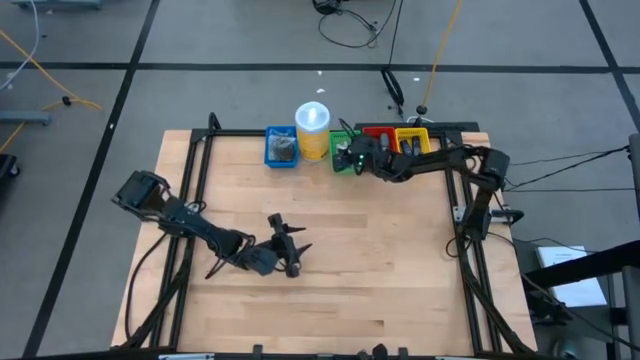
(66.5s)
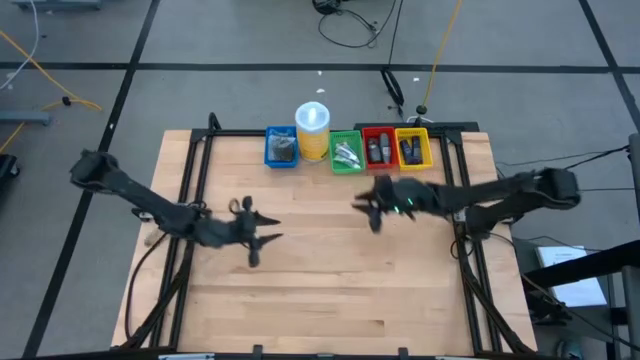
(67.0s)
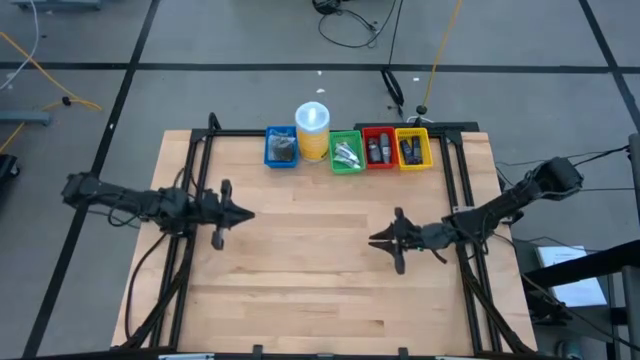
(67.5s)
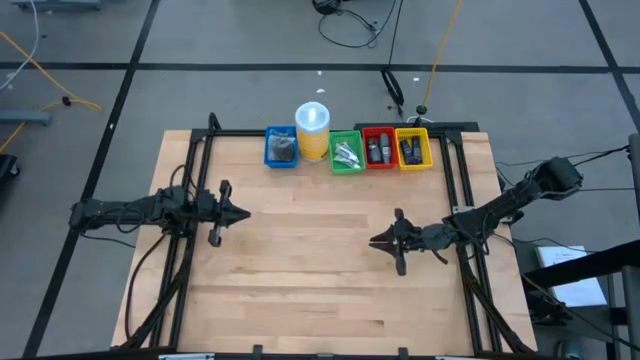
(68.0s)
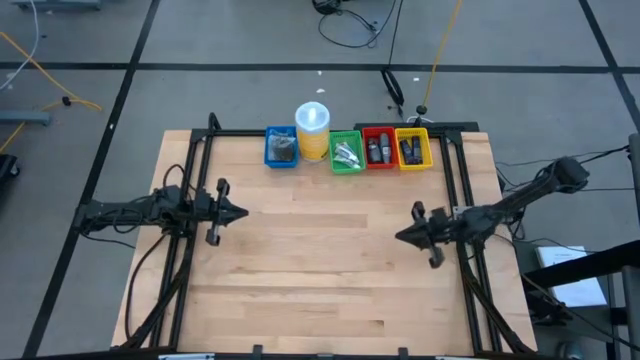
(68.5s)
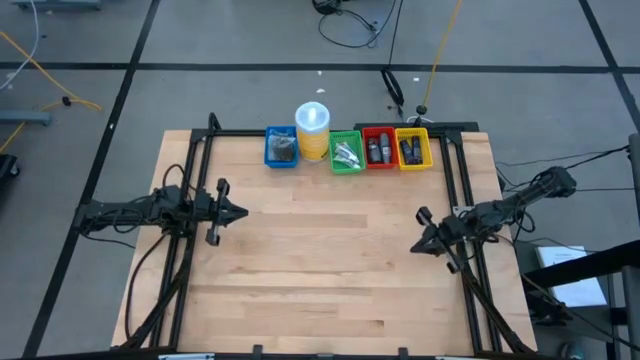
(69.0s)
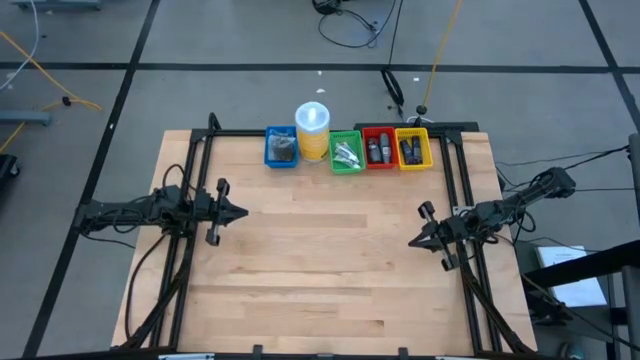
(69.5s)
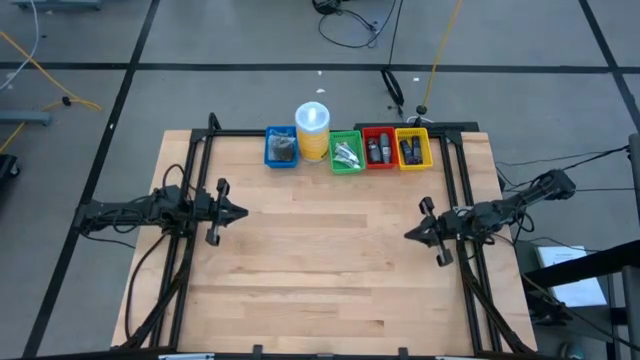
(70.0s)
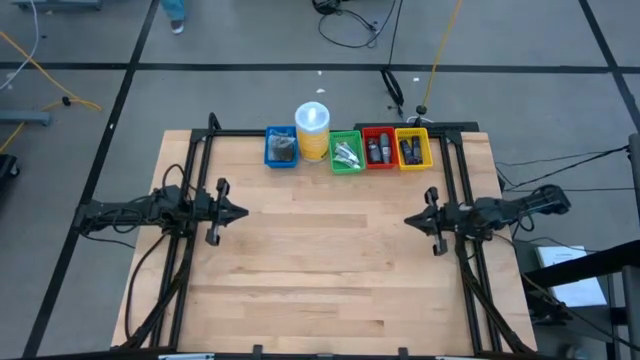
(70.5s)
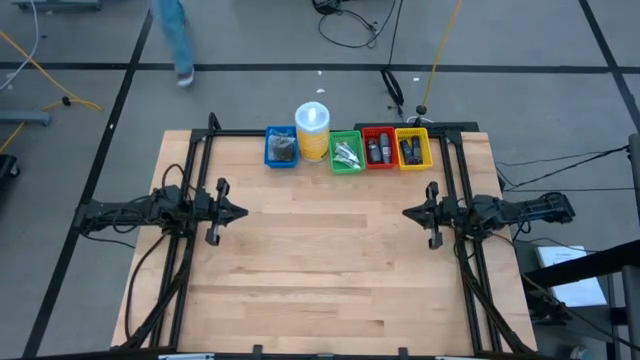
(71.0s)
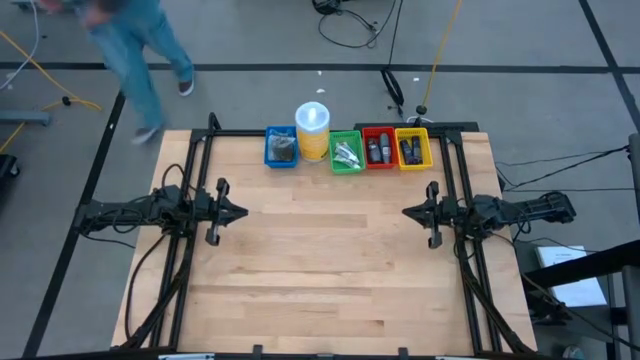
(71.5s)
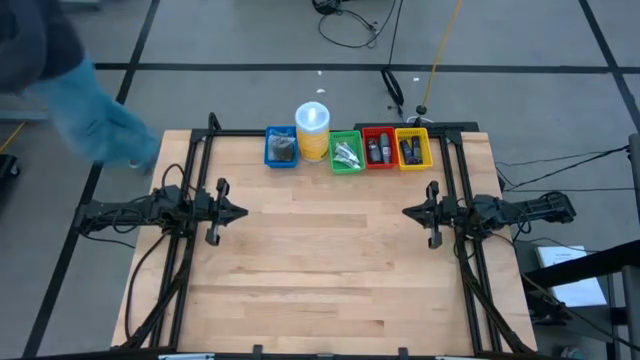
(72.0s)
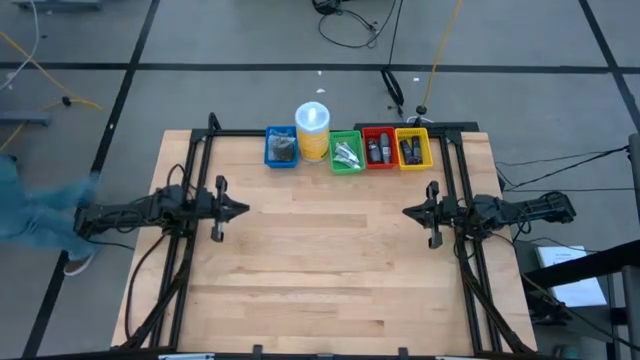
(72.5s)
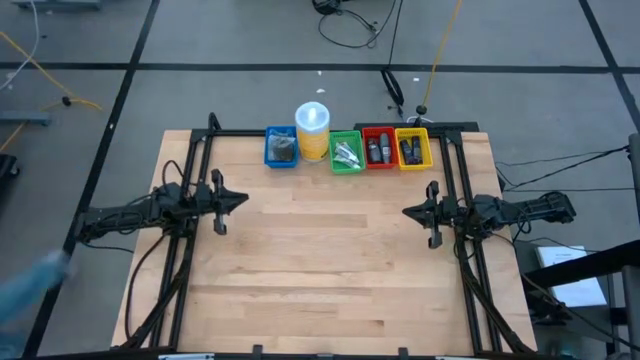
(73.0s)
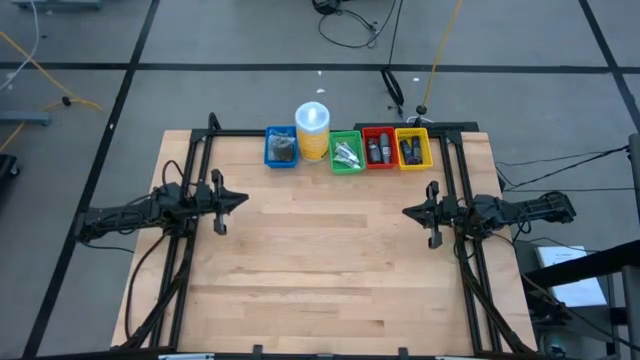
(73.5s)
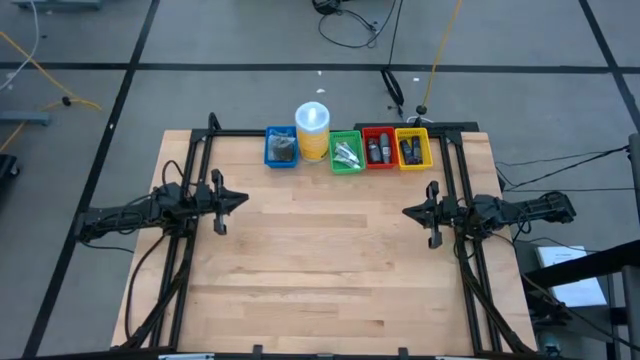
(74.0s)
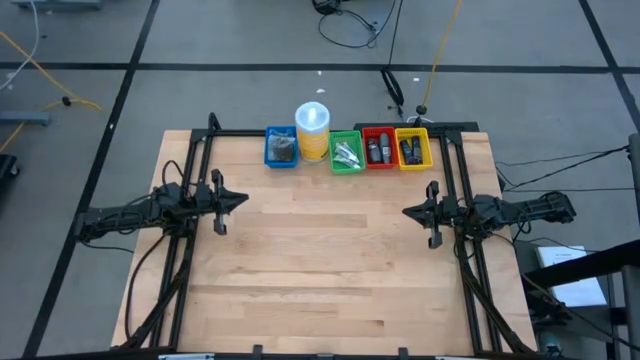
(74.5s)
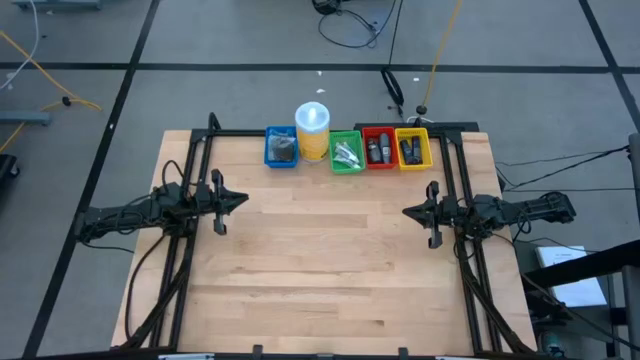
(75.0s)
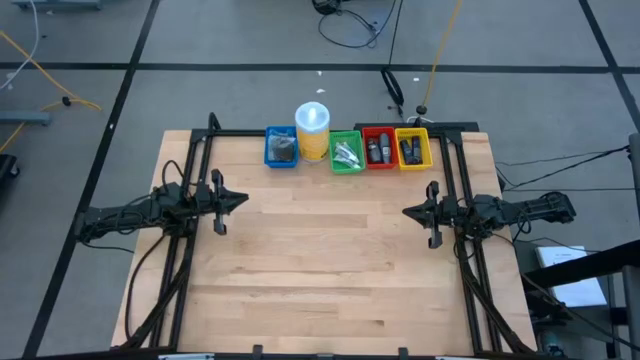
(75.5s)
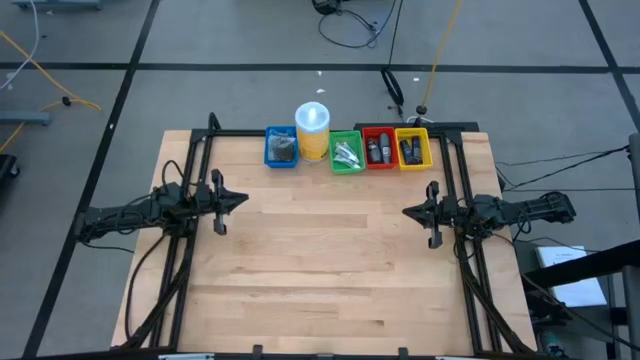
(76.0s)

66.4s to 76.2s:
Task: Pick & Place Travel size toiletries
Return to Home Position

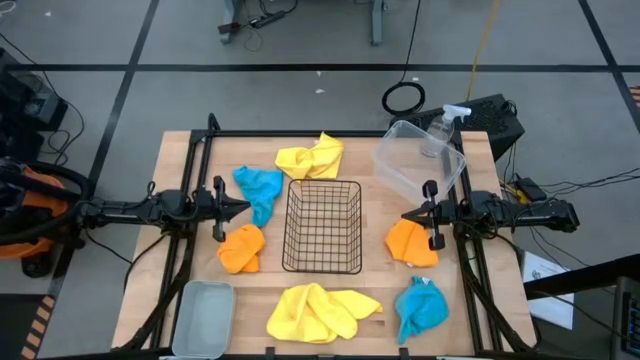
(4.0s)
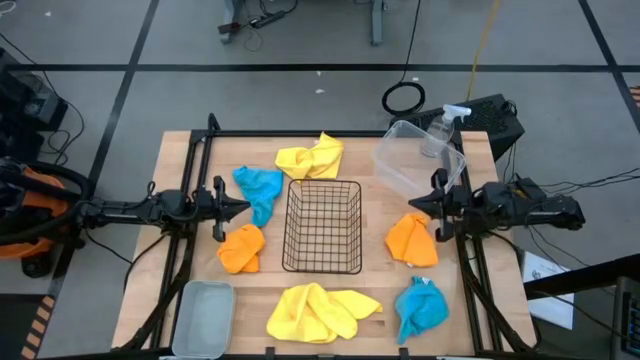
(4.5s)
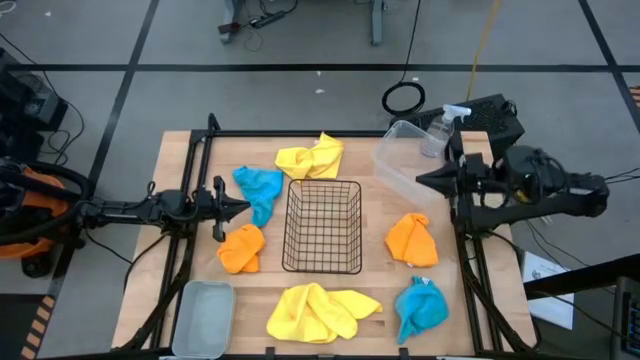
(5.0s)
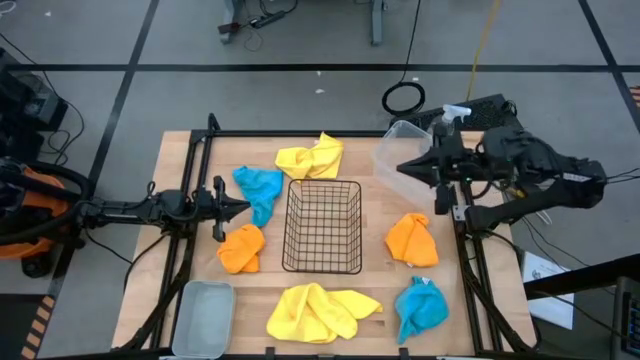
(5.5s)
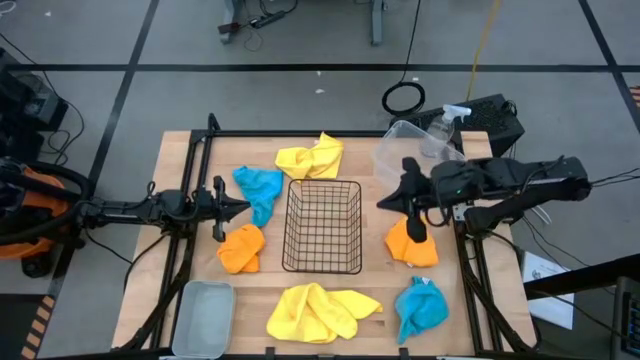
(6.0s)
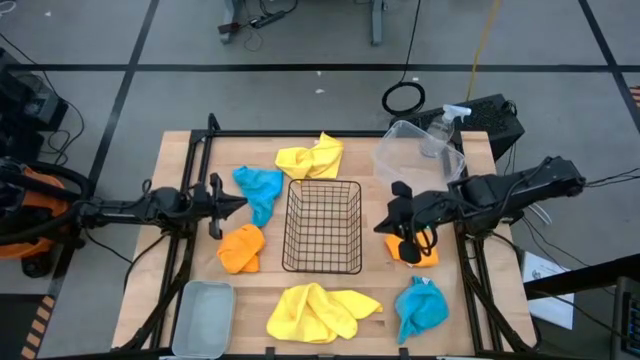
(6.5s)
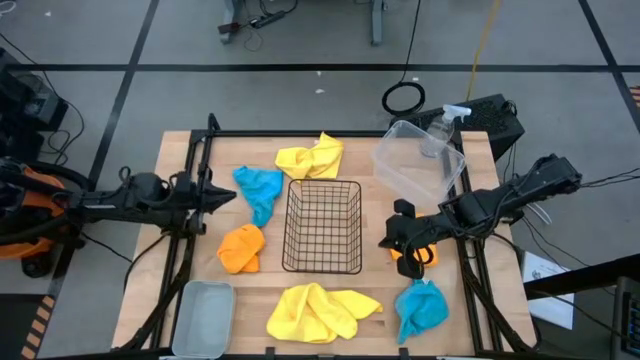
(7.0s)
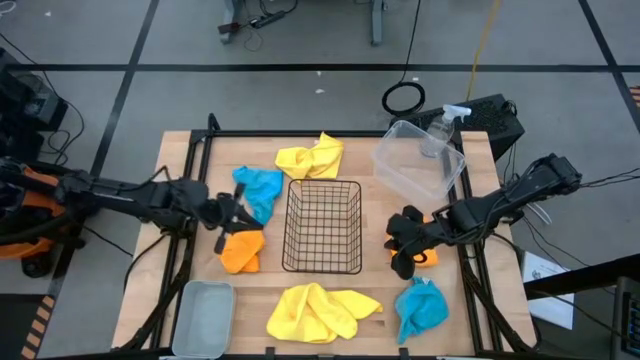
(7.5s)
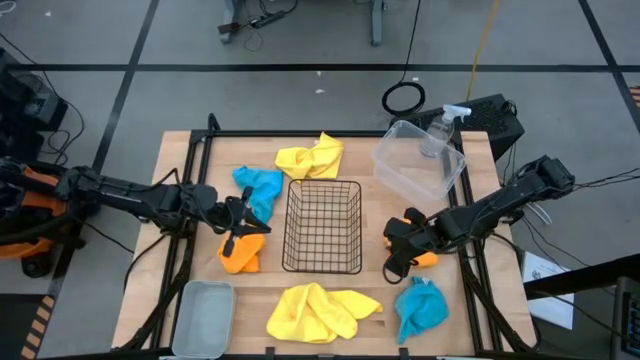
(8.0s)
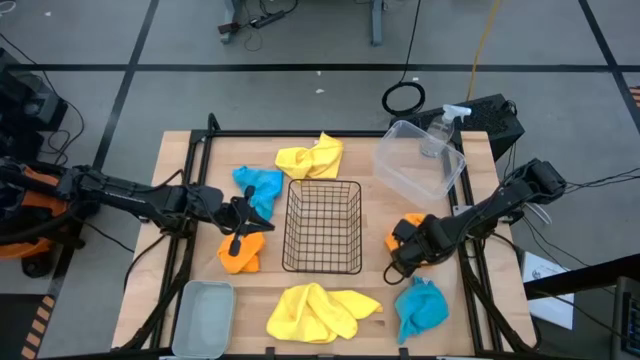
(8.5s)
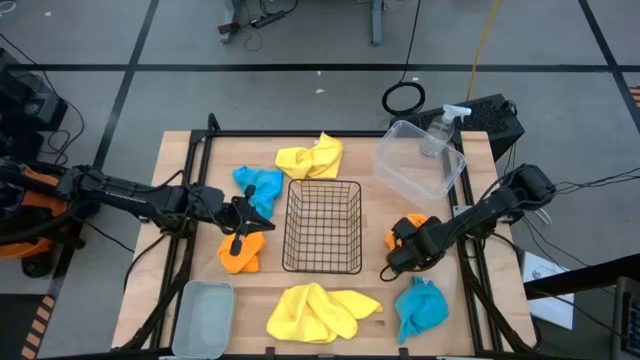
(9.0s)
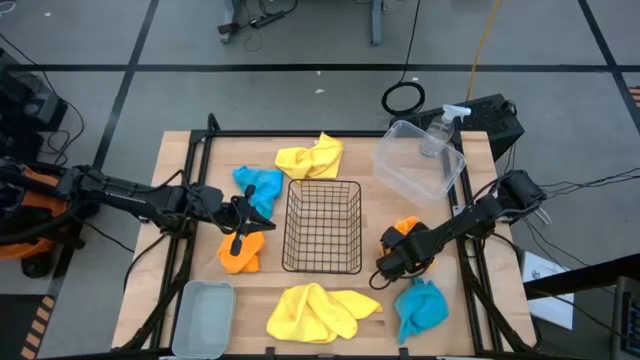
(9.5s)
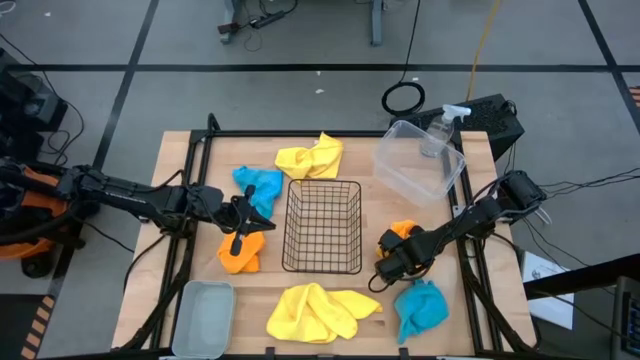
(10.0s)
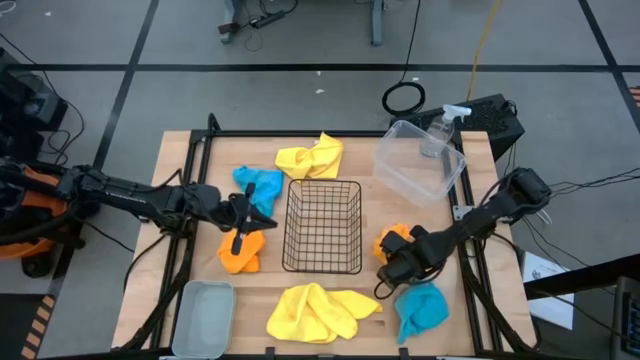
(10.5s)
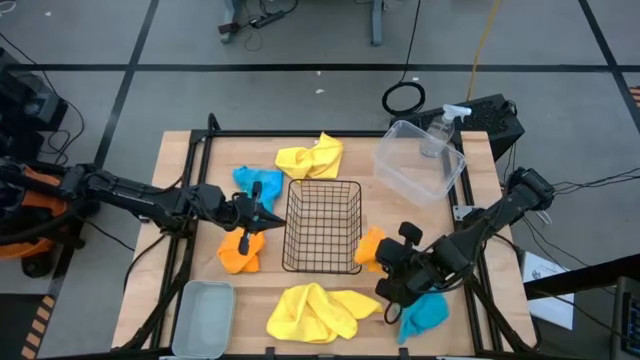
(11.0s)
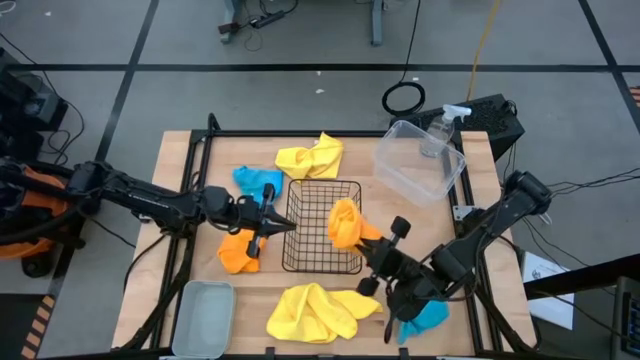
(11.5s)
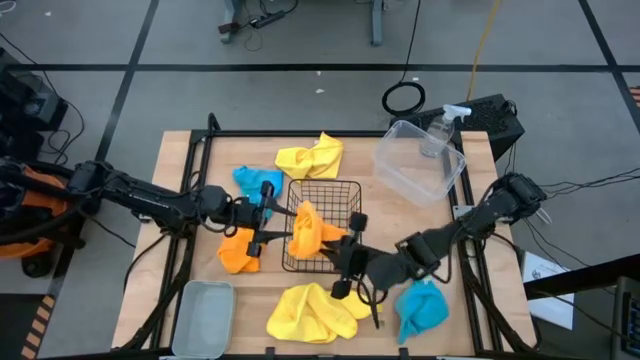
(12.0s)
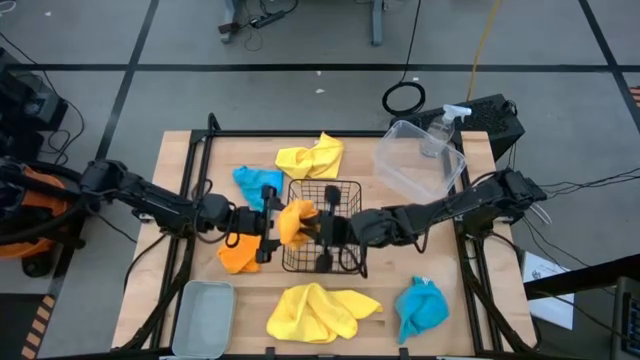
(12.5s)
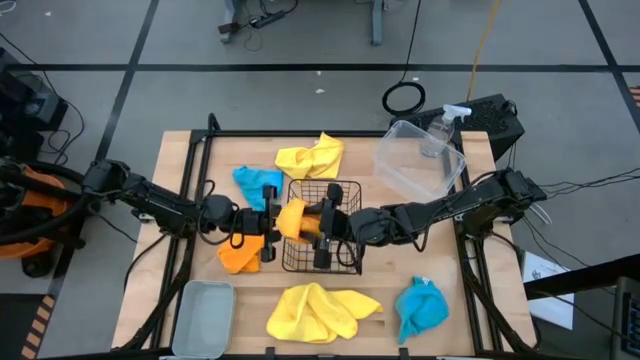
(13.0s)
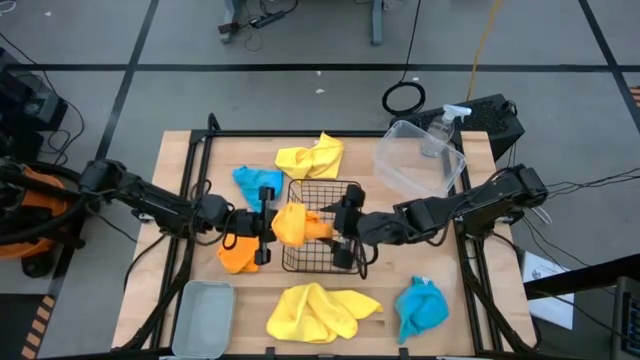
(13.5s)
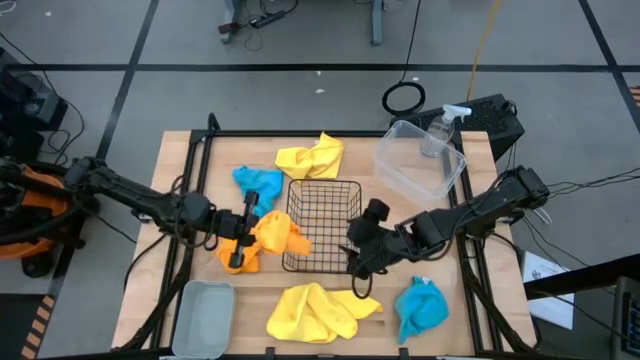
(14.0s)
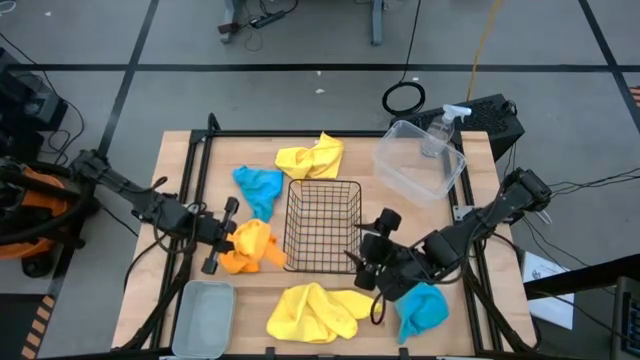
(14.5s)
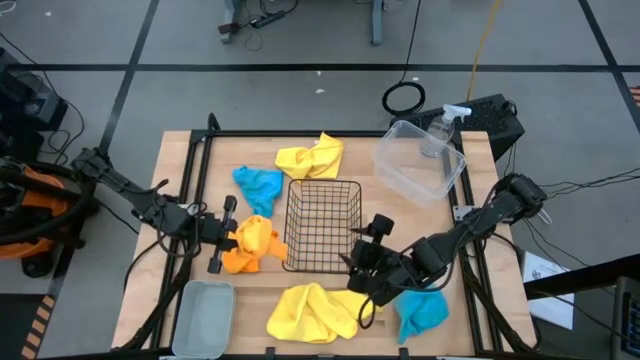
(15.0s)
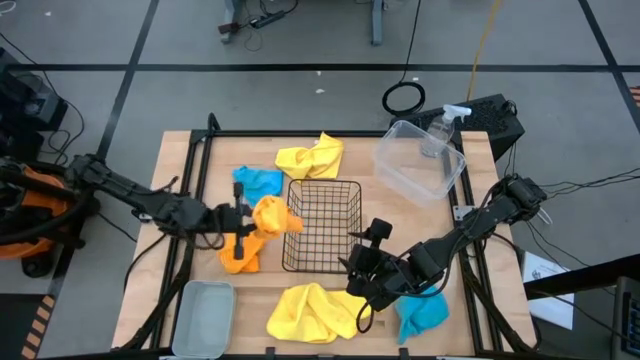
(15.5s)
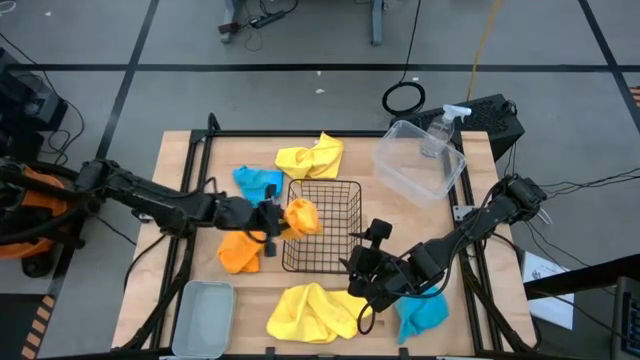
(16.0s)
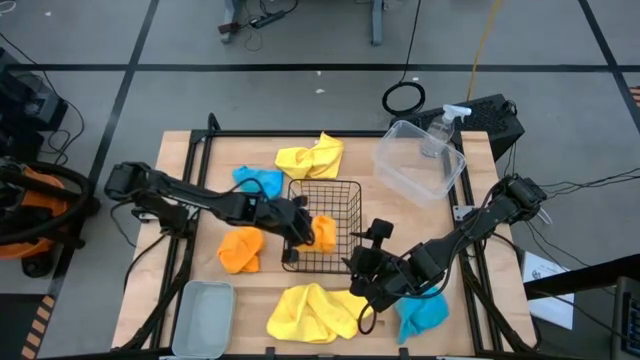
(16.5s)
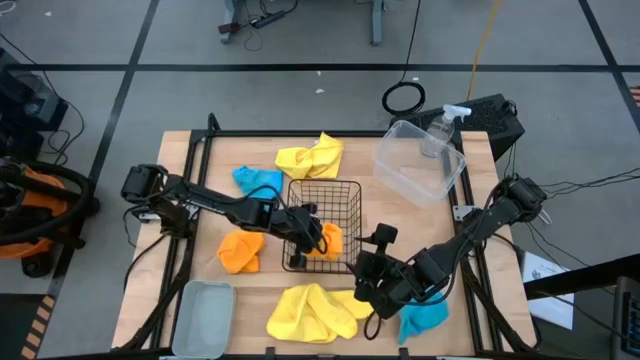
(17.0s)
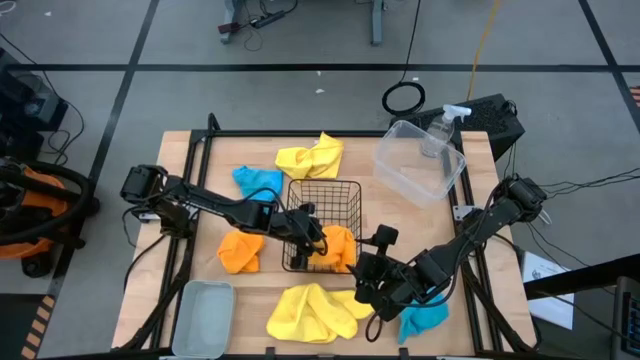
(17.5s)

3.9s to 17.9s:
Task: Sort microfiber towel by color & place in baskets
Put the right orange microfiber towel into the wire basket
